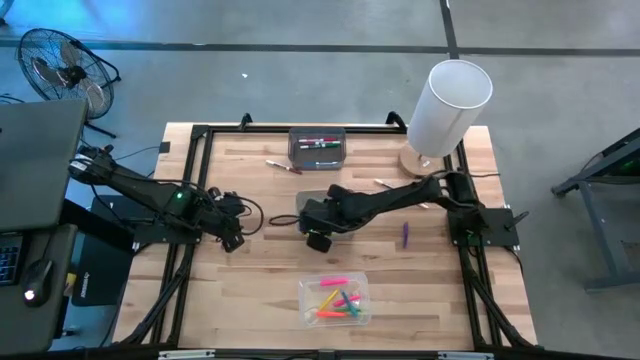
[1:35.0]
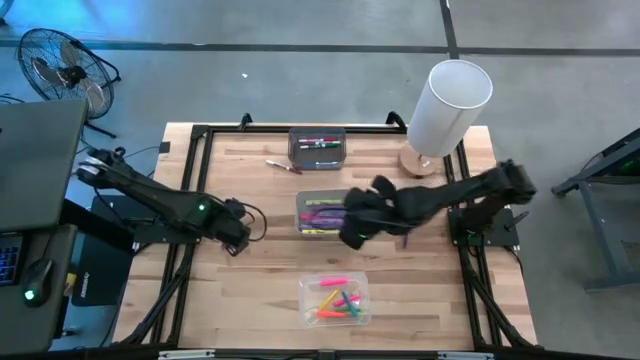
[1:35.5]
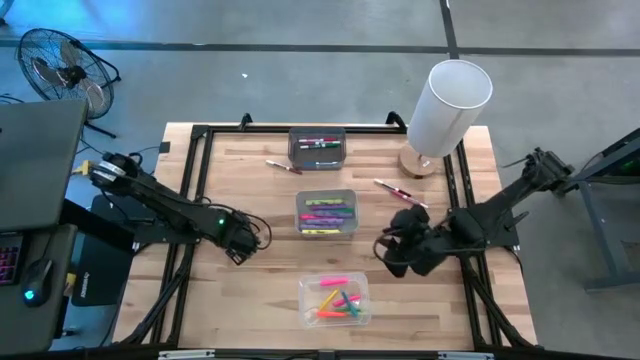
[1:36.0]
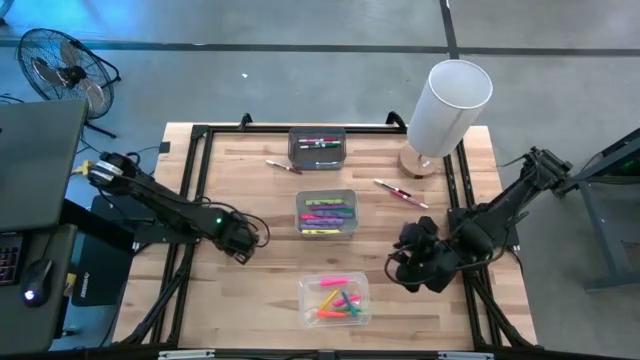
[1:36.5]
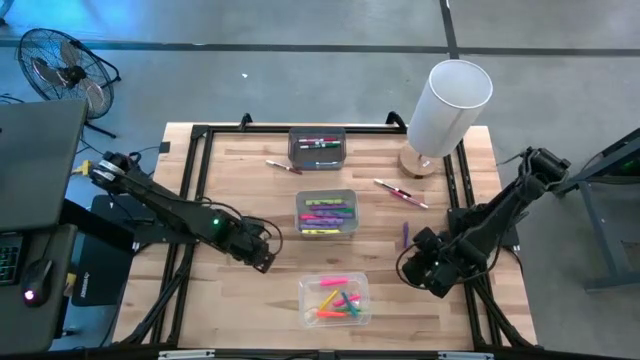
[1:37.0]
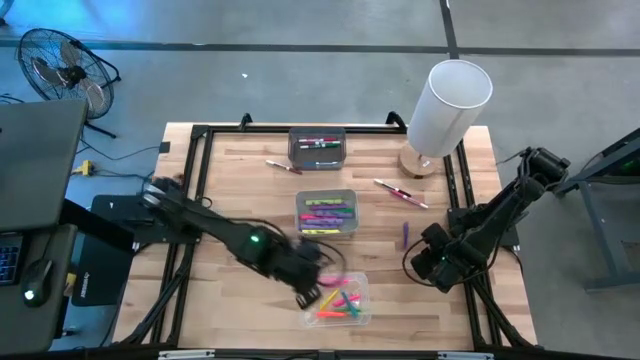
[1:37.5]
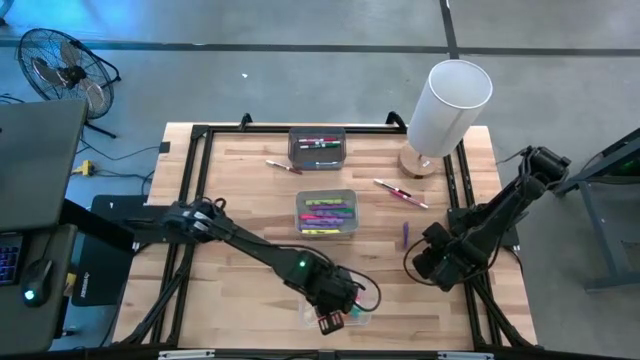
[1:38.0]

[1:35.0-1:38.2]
Task: Pick & Place Markers
Put the violet pen into the transparent bin

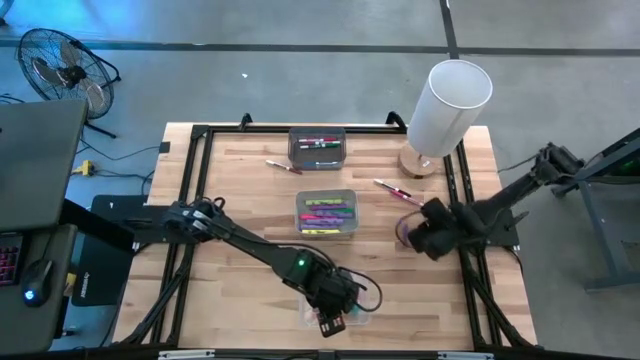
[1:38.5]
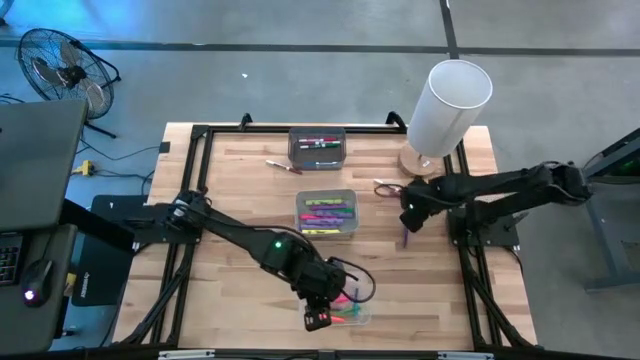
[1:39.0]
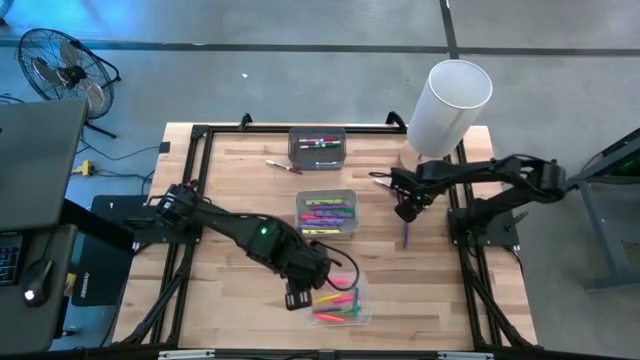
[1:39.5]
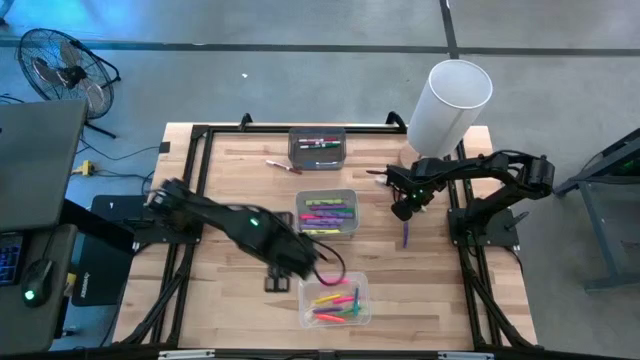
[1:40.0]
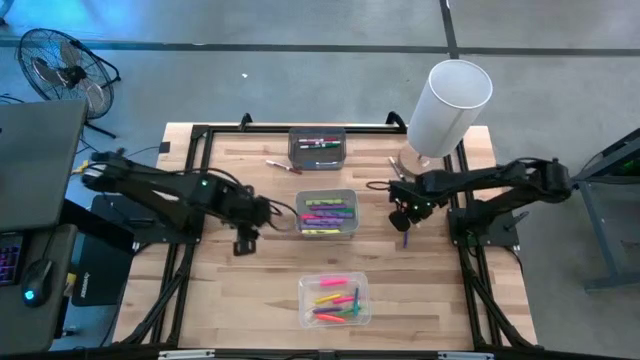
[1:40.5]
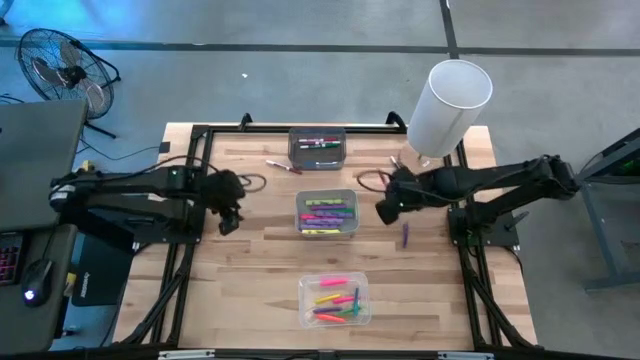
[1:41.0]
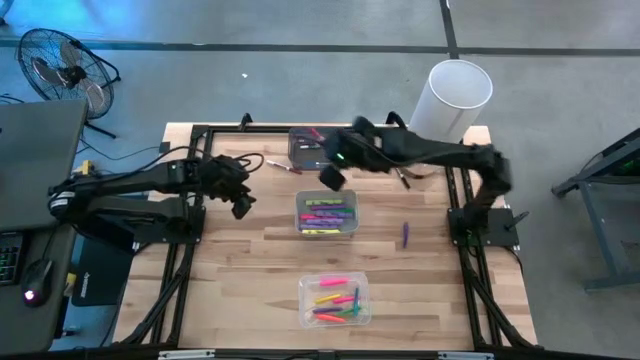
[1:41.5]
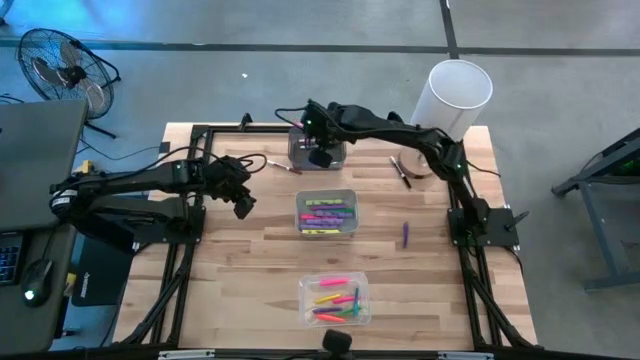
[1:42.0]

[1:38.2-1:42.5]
Put the pink marker pen into the black bin

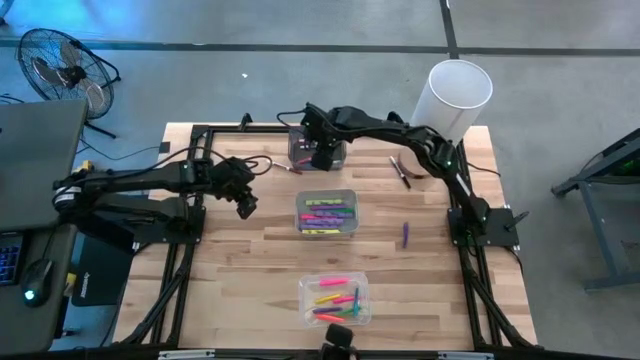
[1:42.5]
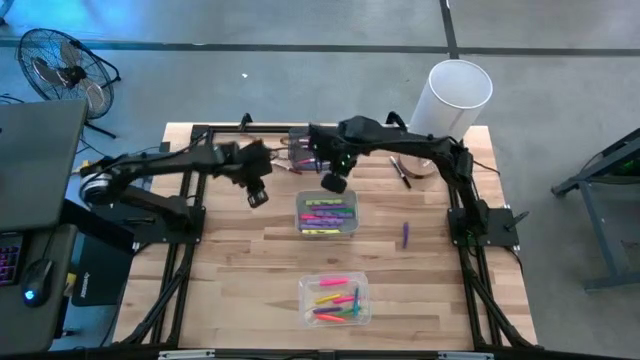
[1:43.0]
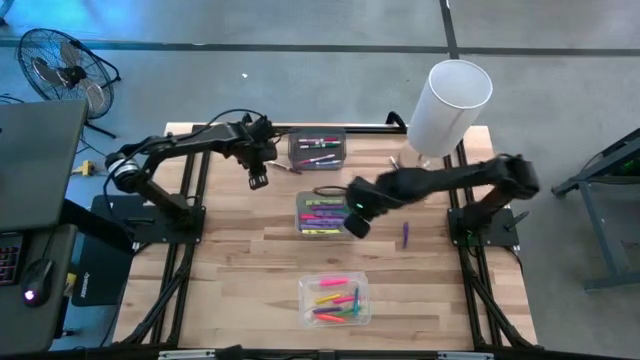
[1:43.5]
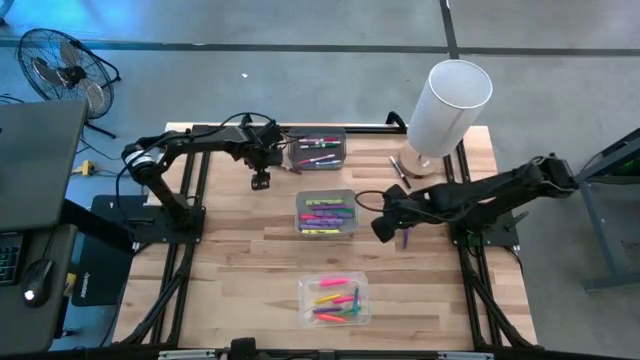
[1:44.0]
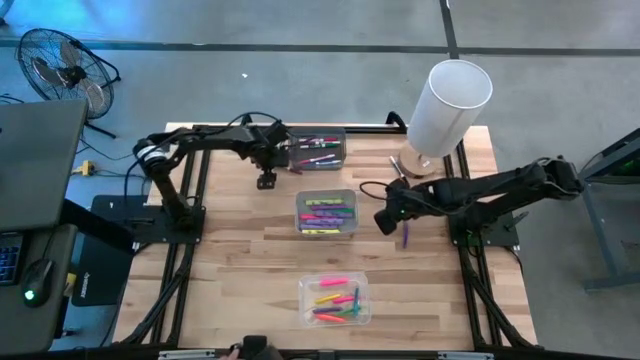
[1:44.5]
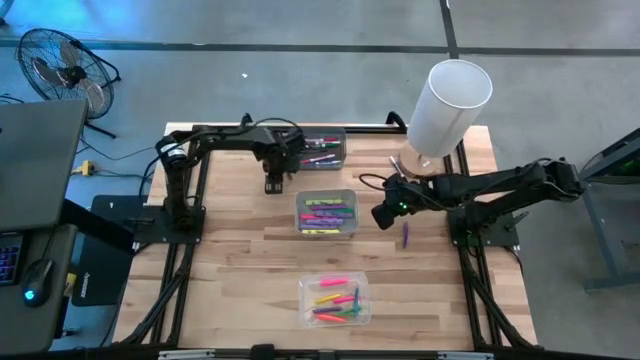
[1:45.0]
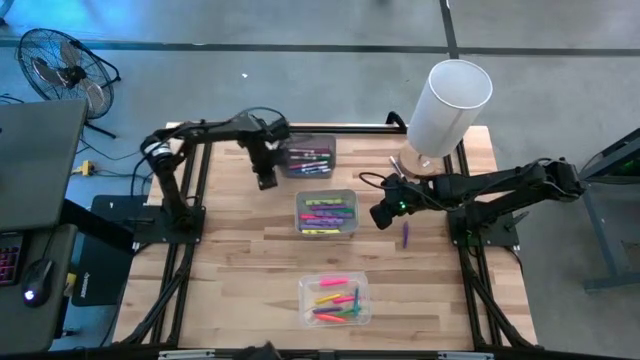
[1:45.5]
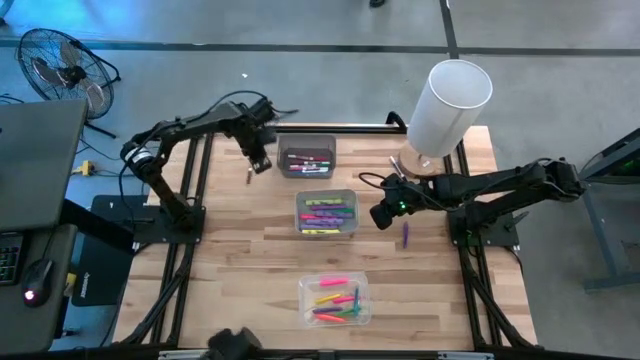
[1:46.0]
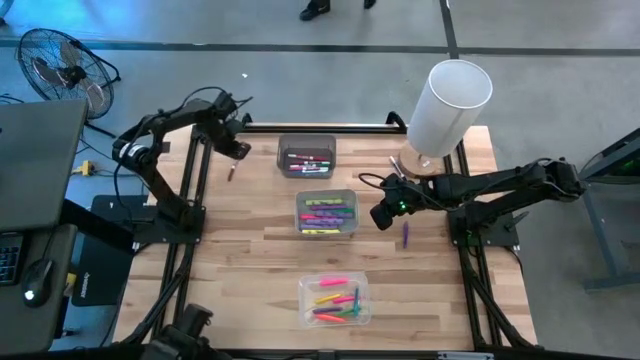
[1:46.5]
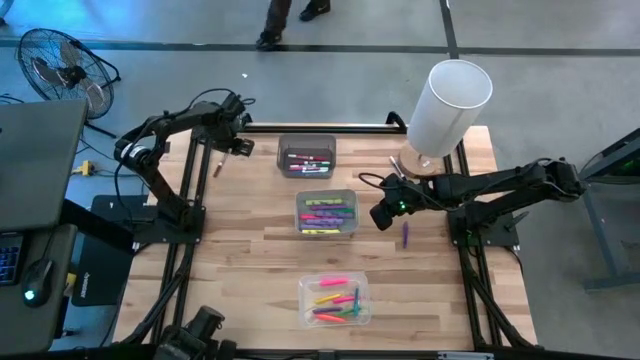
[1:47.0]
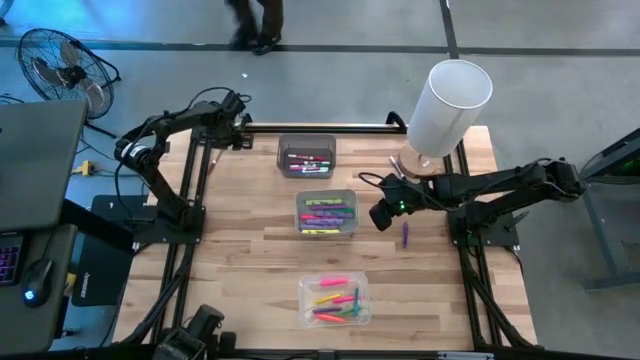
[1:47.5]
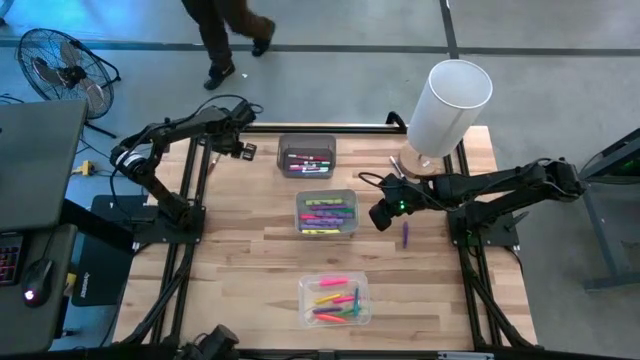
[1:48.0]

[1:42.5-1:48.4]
Put the brown marker pen into the black bin

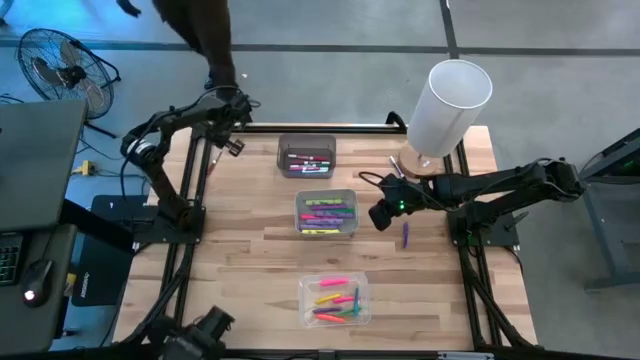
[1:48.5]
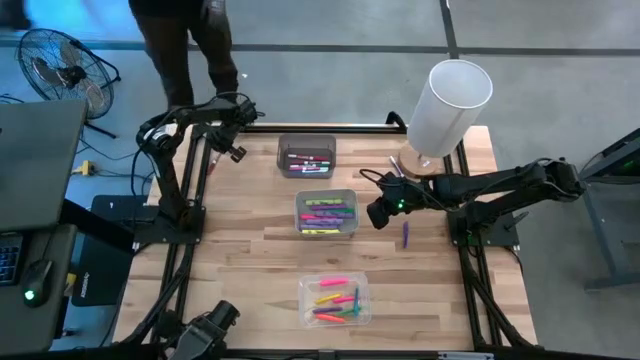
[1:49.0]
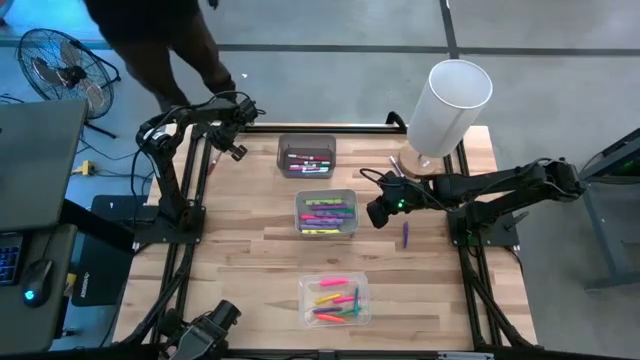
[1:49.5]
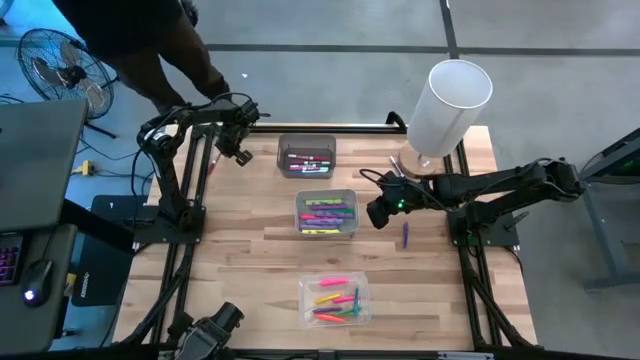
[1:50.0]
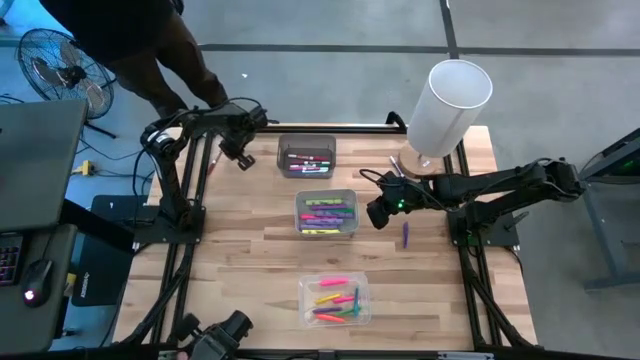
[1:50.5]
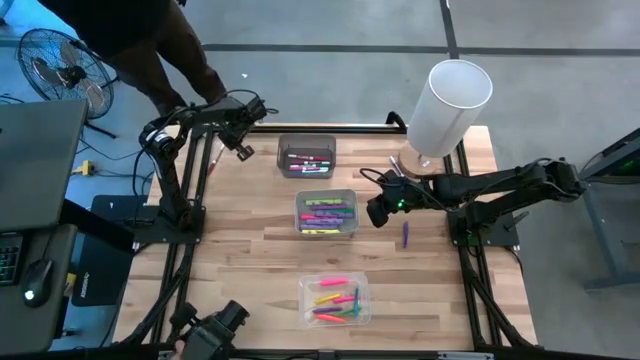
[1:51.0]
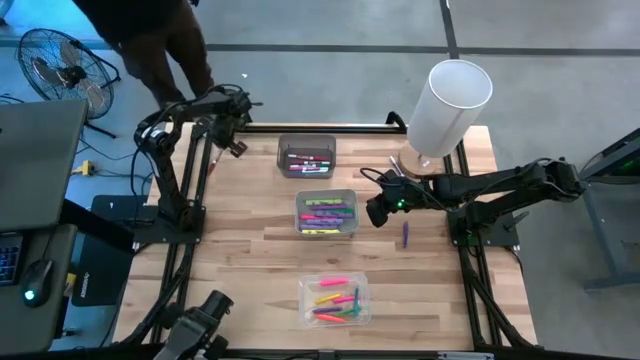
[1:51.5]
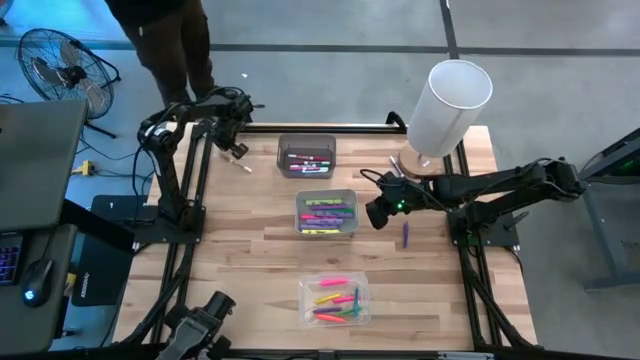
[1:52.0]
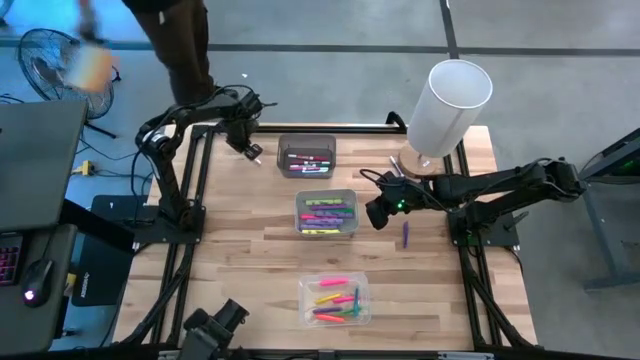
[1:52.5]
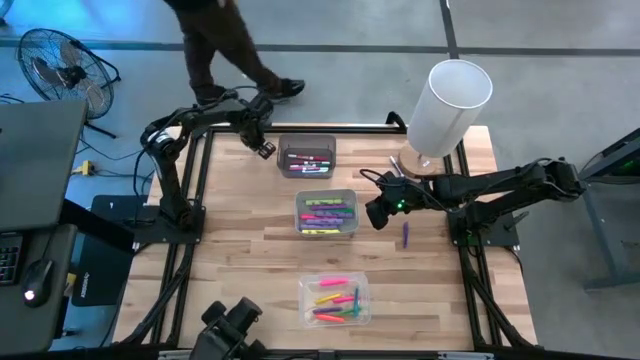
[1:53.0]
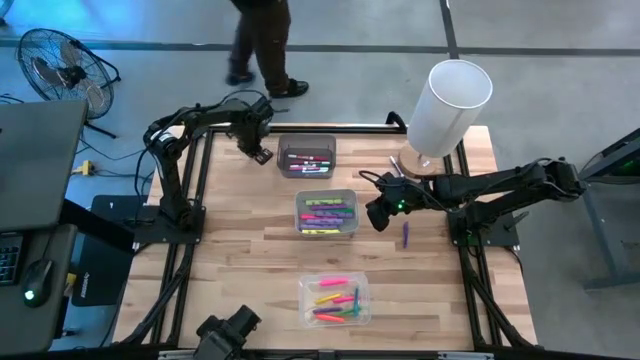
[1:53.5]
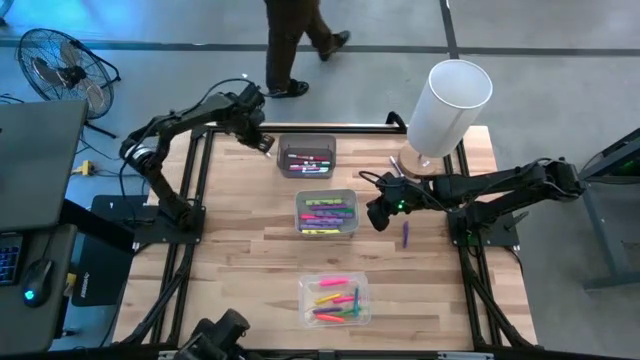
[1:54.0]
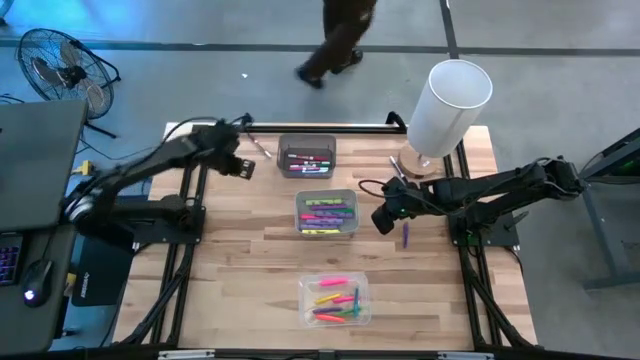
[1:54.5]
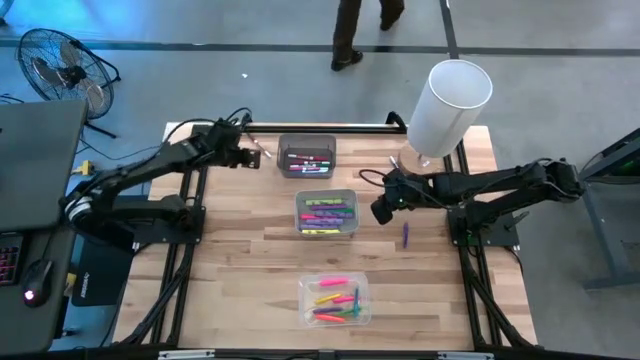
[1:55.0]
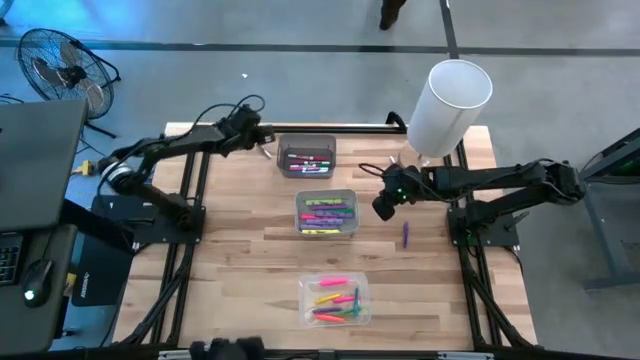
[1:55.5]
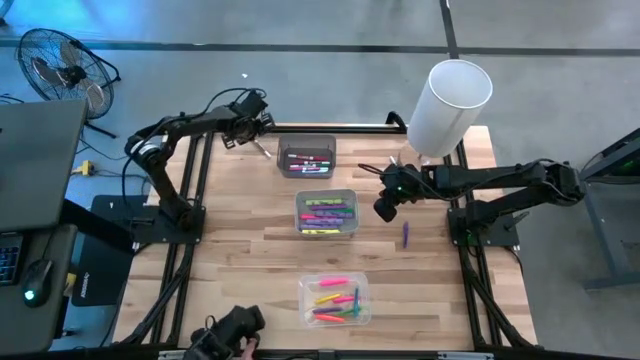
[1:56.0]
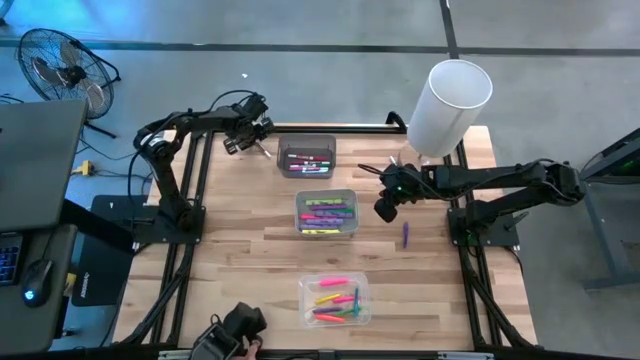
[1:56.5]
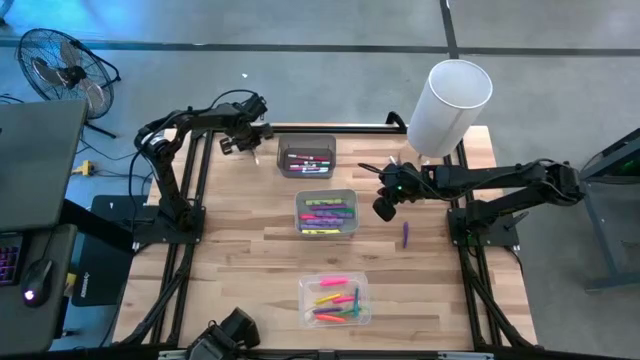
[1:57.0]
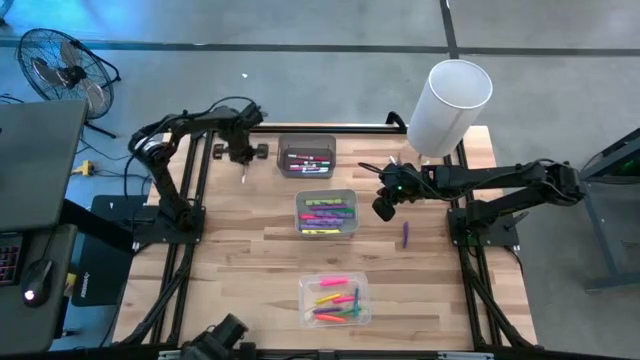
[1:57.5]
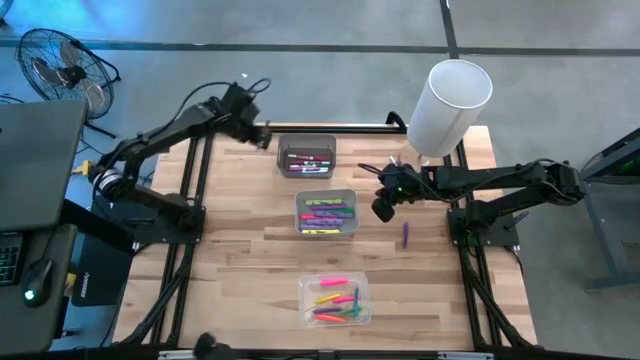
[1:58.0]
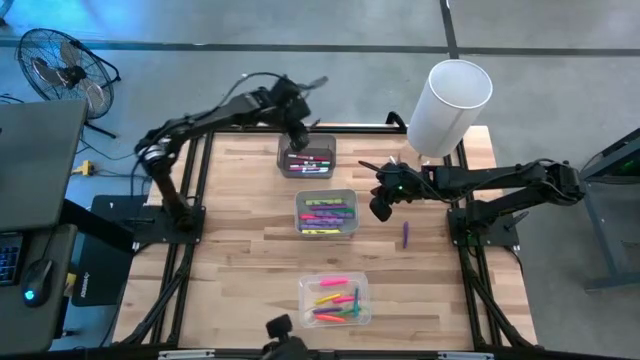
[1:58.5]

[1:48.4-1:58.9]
Put the brown marker pen into the black bin
